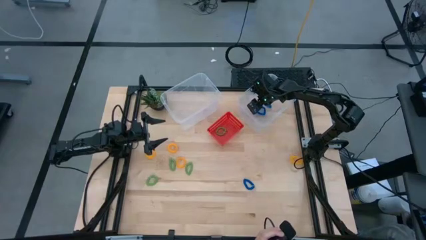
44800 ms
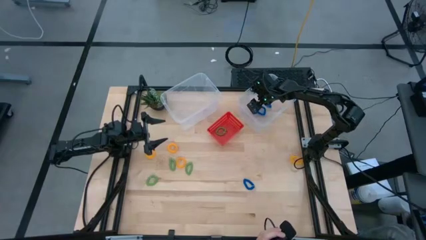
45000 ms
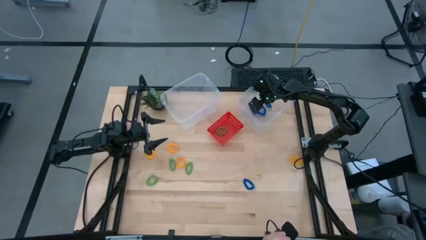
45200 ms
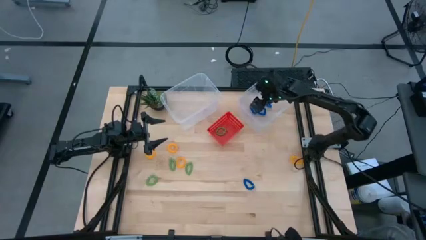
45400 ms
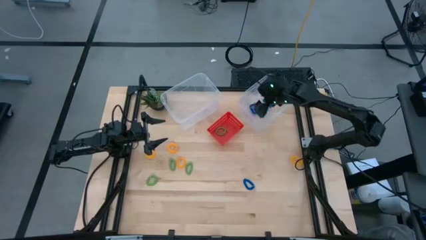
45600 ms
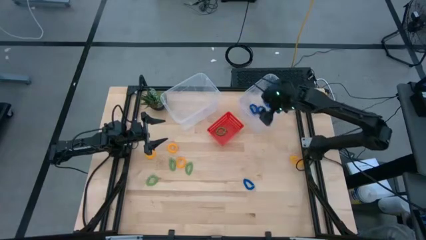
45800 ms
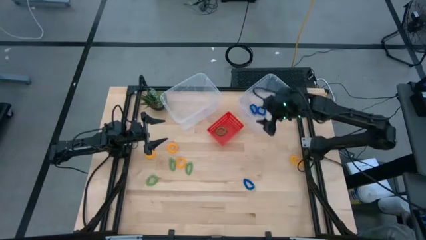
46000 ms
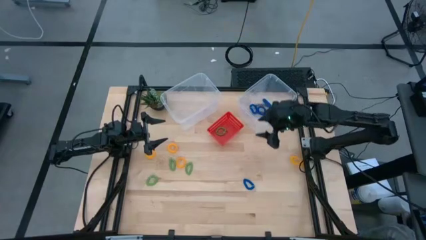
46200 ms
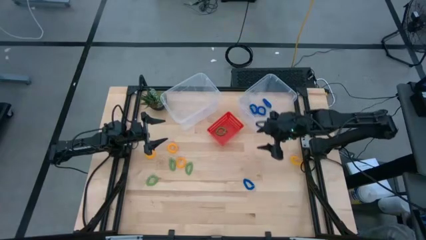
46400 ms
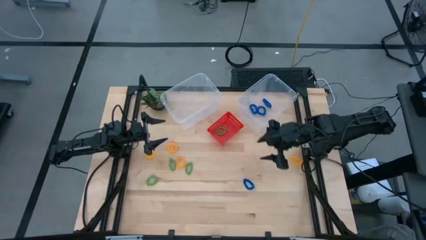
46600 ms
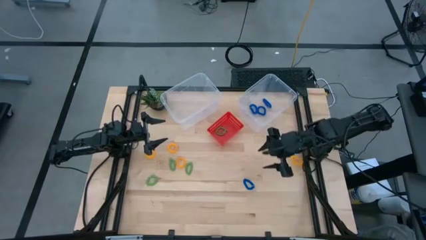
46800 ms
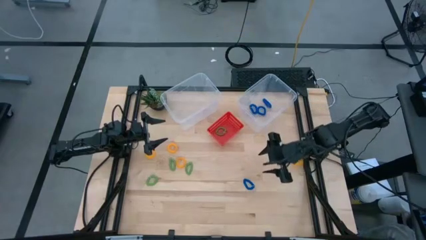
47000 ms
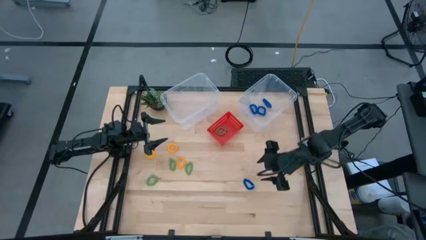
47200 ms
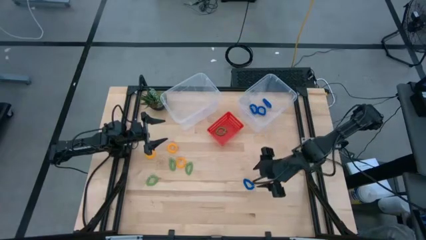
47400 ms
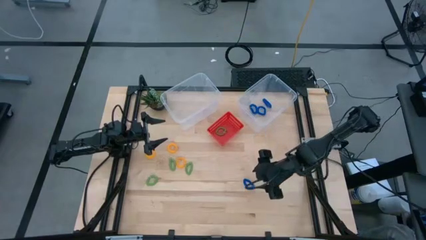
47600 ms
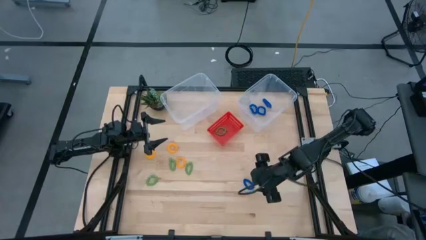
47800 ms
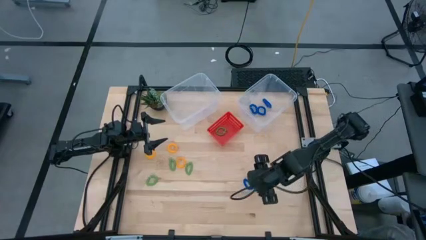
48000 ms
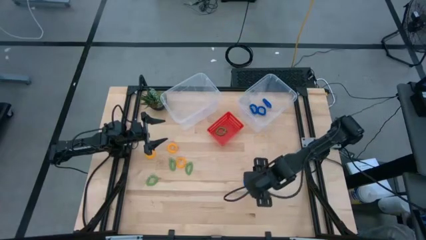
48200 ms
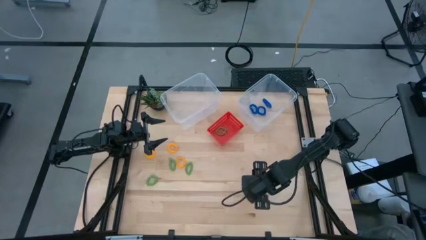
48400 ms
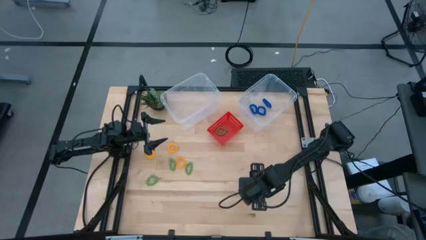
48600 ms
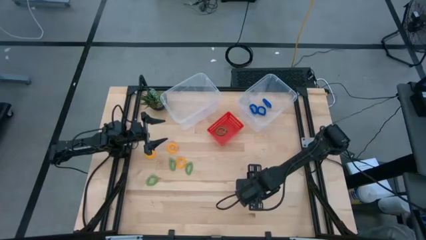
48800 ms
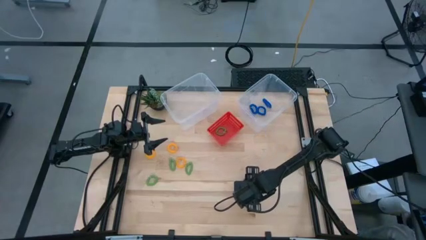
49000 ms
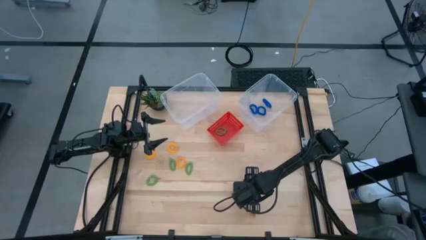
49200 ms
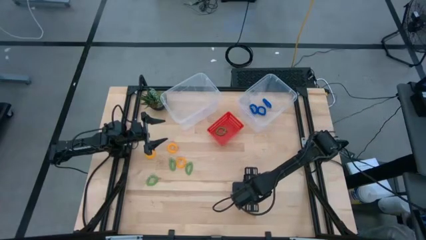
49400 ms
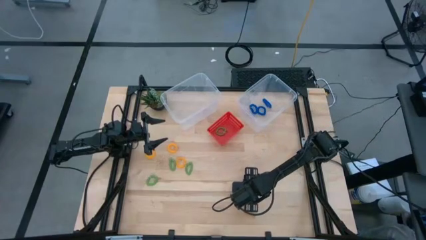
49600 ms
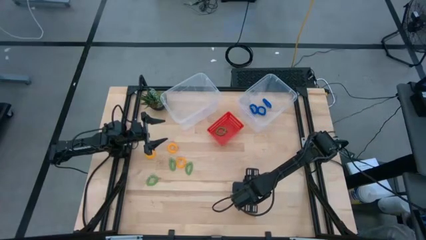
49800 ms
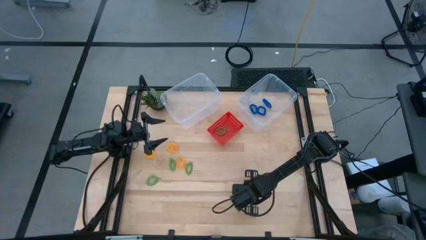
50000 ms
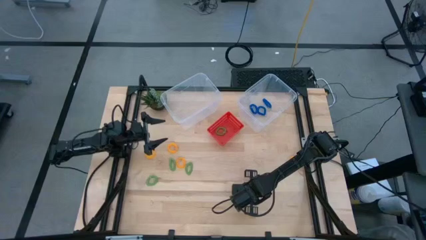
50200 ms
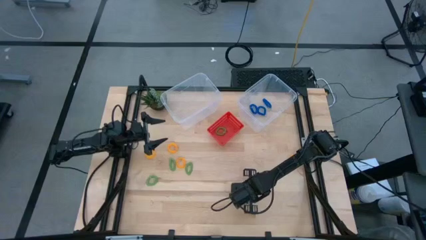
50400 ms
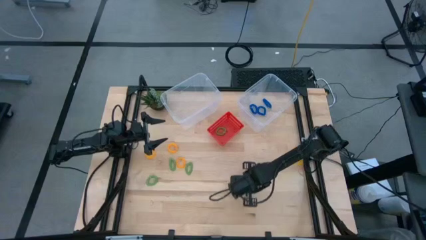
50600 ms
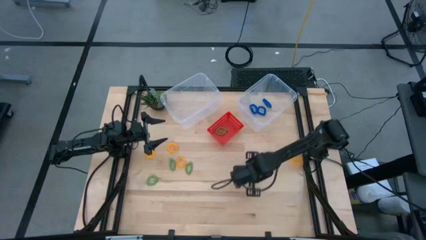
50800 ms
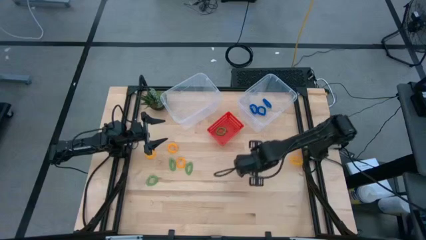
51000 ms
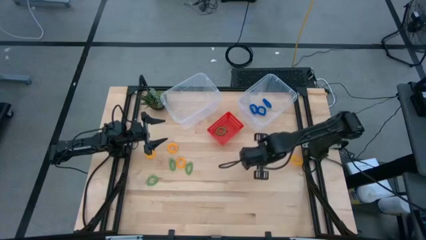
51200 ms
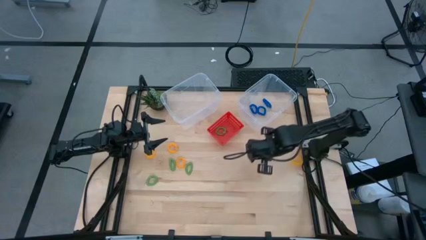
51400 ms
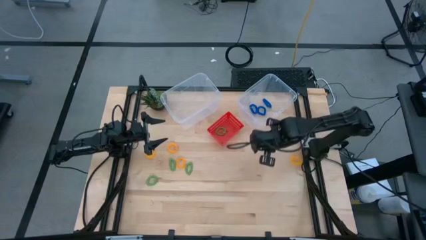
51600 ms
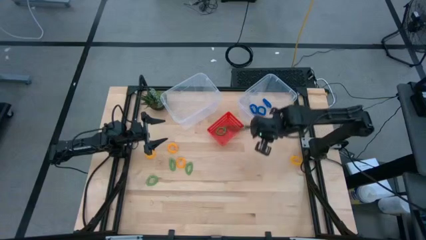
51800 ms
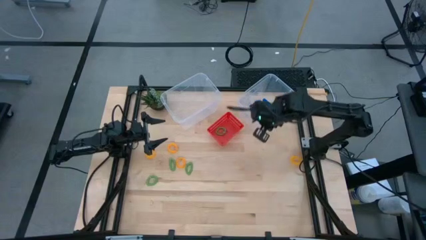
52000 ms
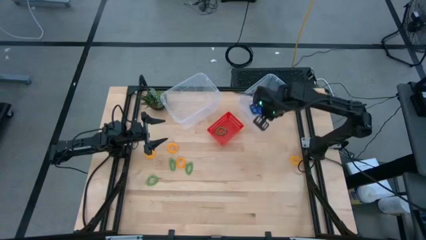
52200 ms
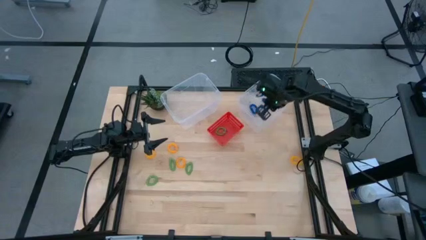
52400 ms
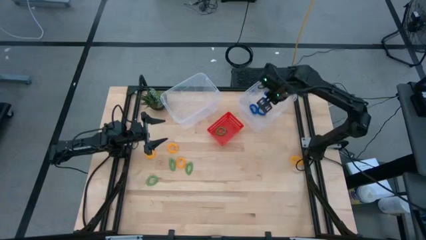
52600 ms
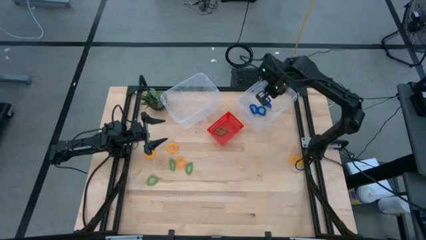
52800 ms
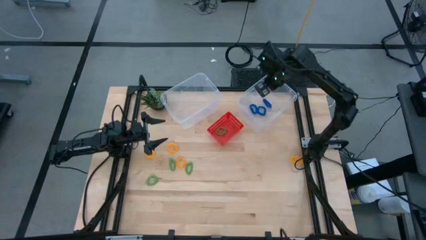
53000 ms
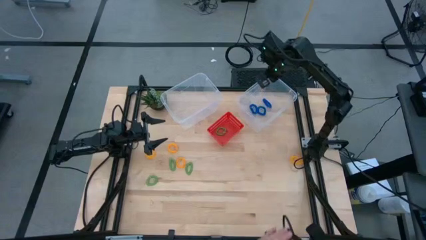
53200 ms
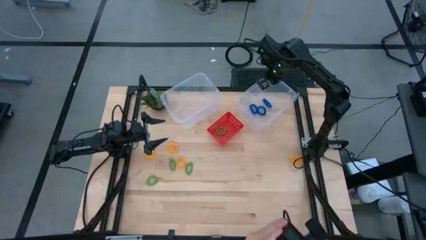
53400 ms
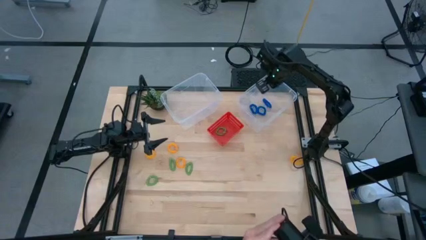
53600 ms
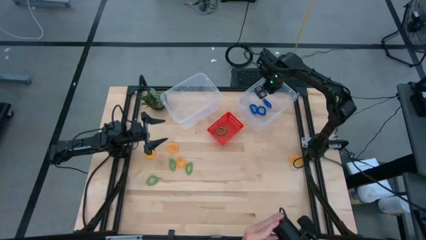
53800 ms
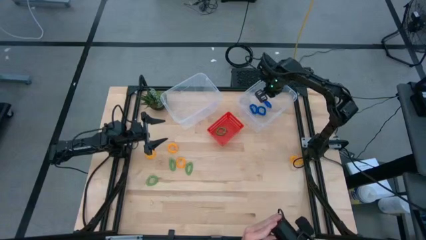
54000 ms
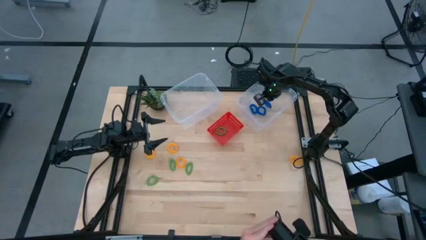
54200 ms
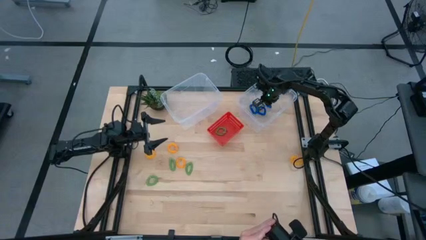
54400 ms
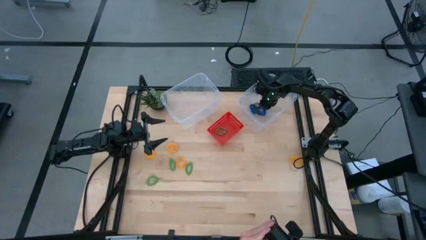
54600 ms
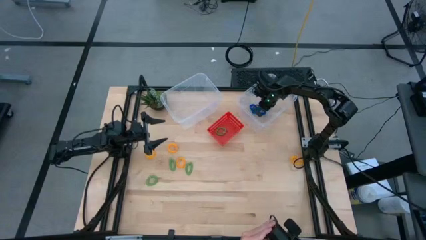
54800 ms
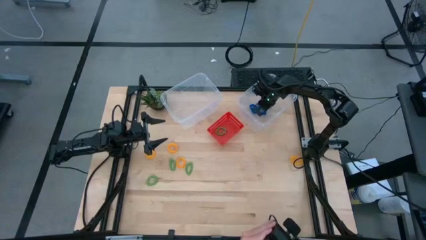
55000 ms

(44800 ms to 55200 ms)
Task: Sort spring keychains
Put the blue spring keychain into the right transparent bin

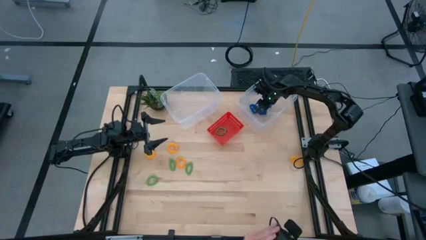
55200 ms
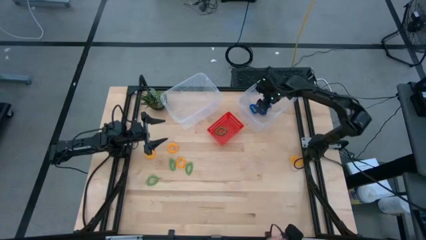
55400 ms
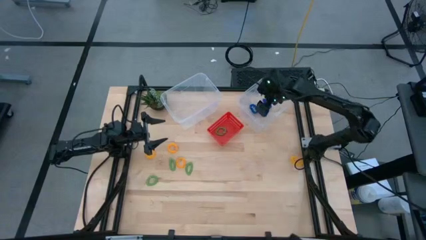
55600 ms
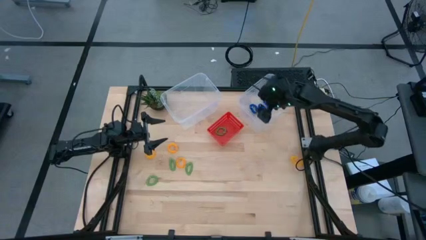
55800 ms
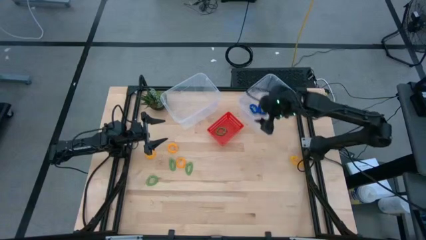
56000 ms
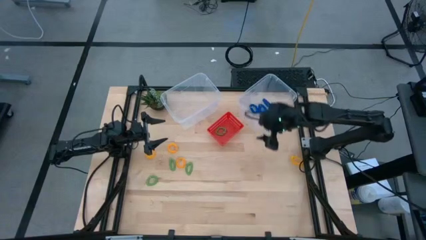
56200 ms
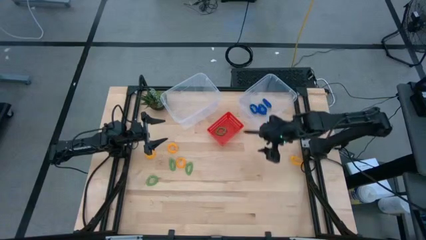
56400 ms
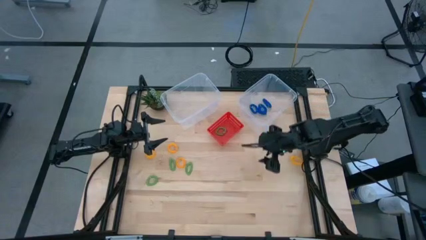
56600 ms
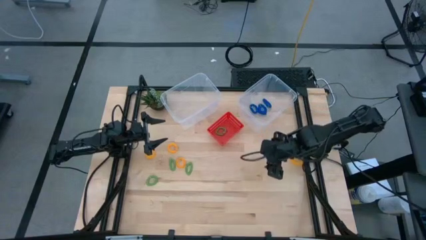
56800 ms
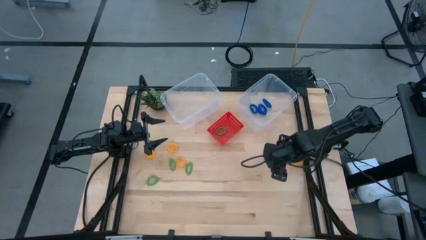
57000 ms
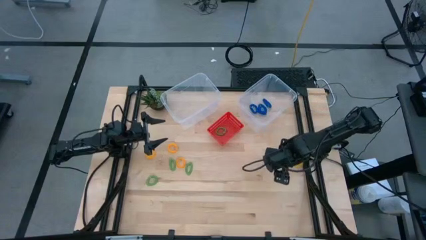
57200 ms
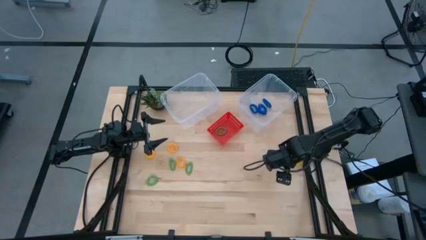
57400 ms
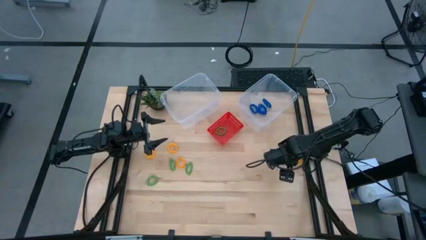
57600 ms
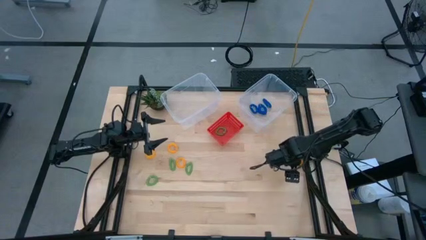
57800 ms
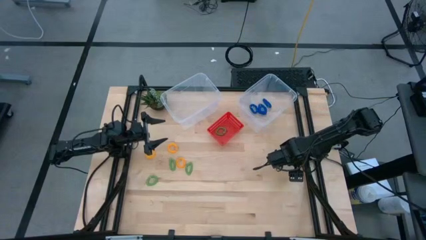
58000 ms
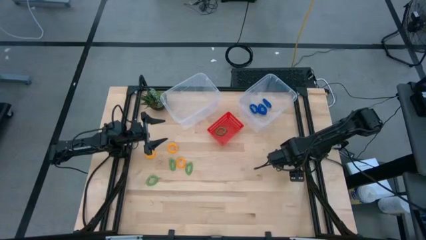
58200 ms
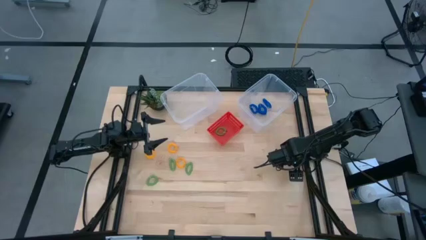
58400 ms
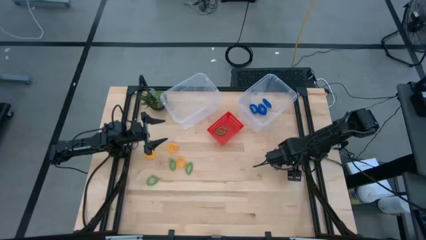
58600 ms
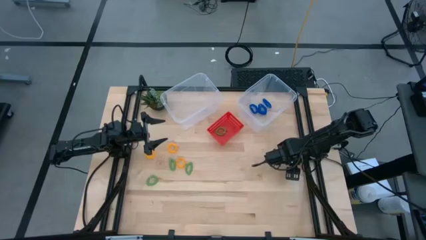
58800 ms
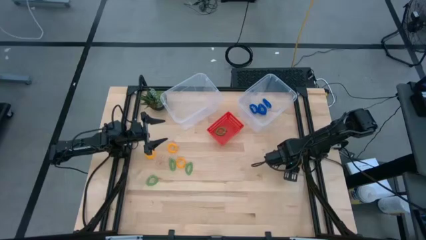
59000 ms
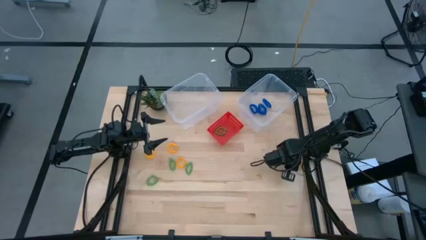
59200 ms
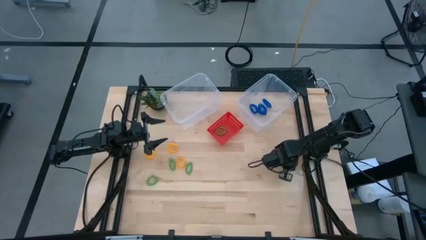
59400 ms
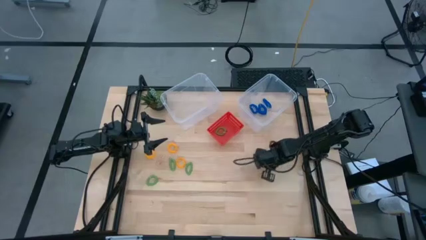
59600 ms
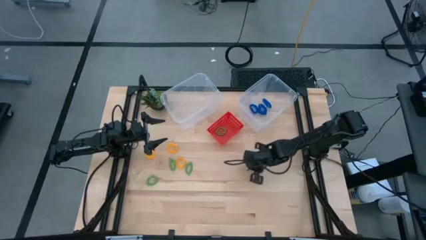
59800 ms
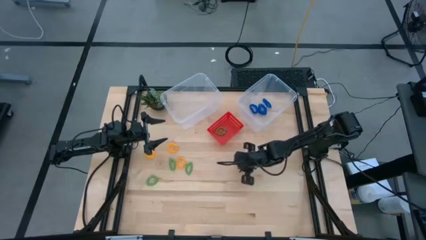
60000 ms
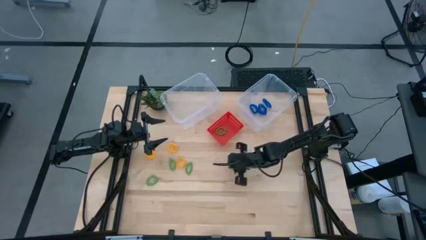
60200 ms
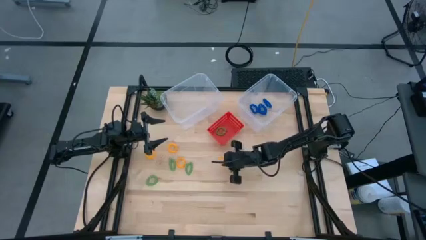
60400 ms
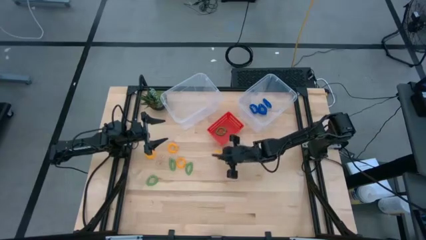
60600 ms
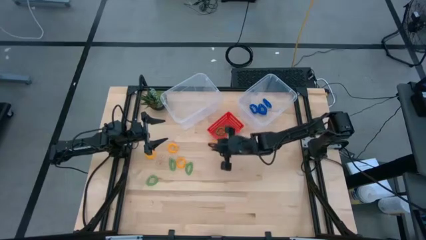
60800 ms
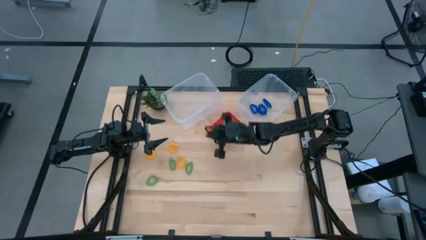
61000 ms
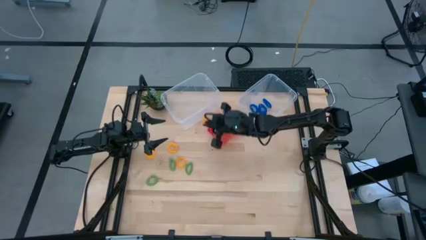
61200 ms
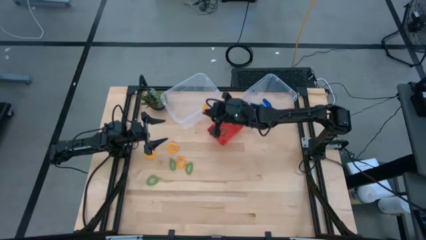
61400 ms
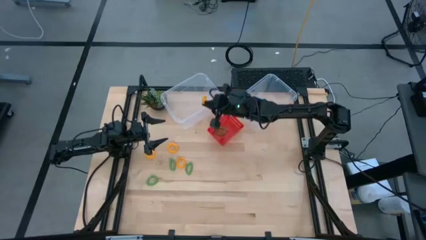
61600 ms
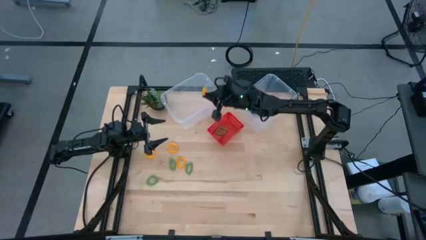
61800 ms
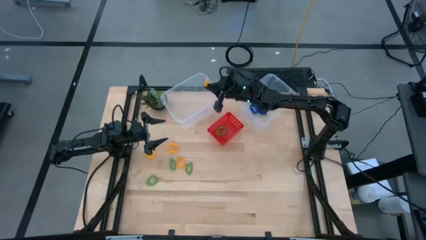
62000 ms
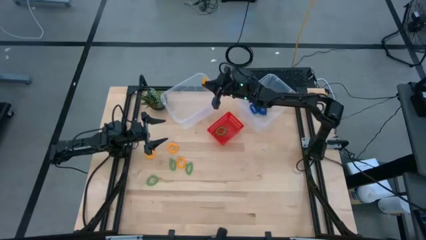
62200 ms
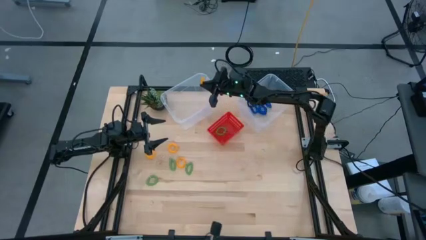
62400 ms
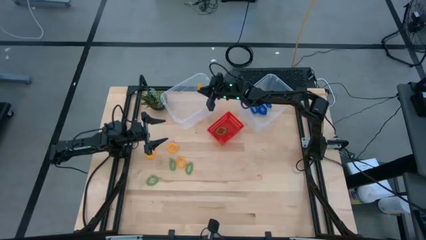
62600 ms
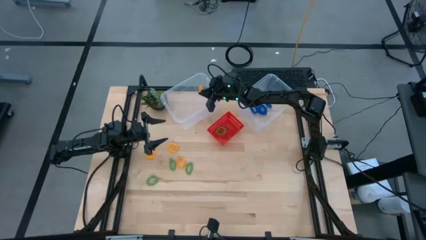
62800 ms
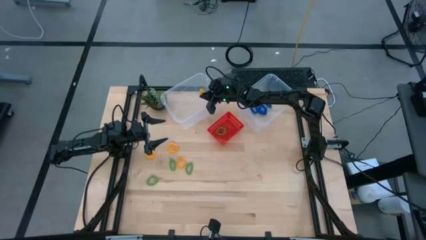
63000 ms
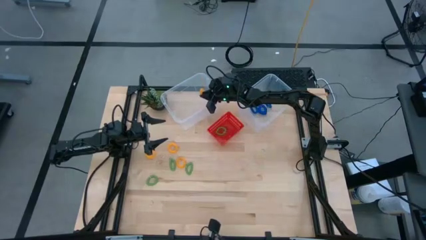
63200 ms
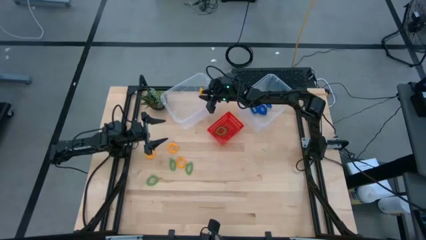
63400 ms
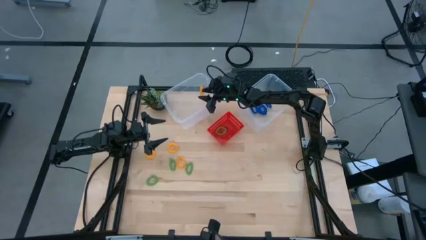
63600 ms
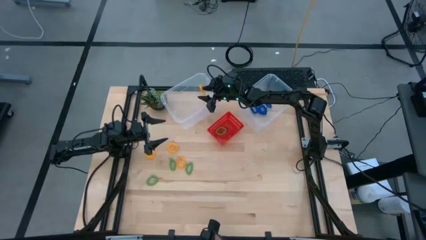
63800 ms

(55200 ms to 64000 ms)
Put the yellow spring keychain into the left transparent bin
